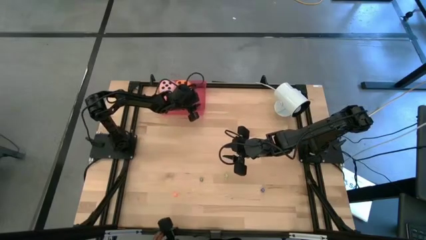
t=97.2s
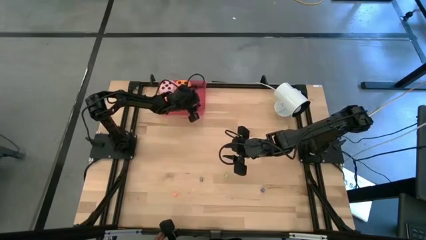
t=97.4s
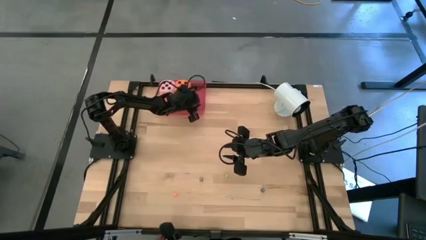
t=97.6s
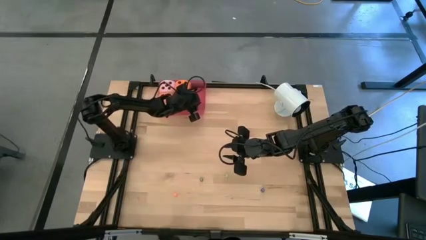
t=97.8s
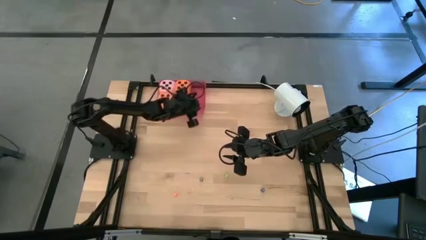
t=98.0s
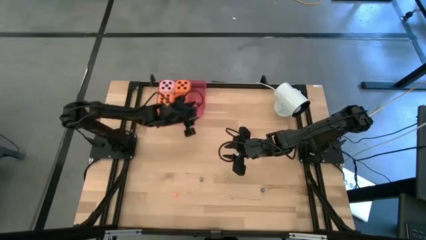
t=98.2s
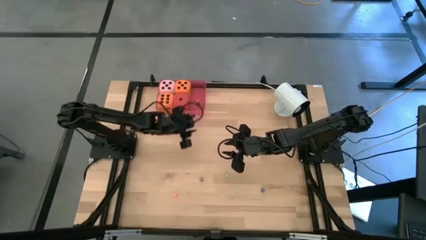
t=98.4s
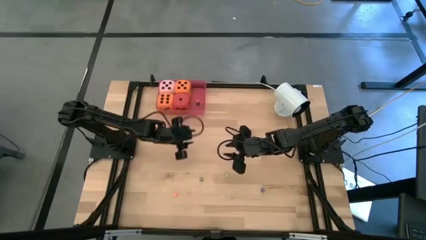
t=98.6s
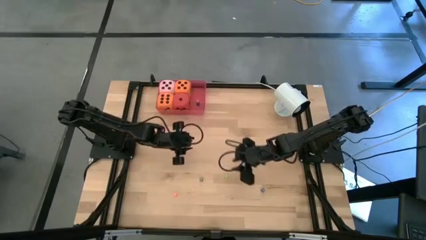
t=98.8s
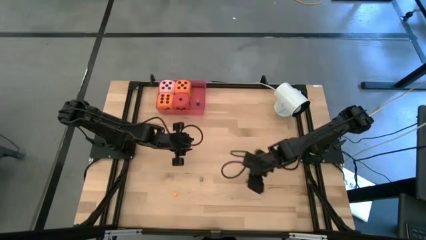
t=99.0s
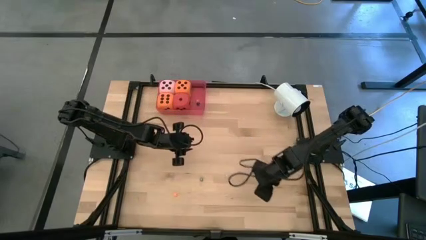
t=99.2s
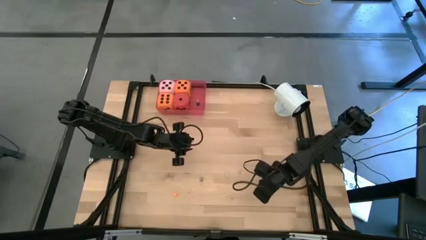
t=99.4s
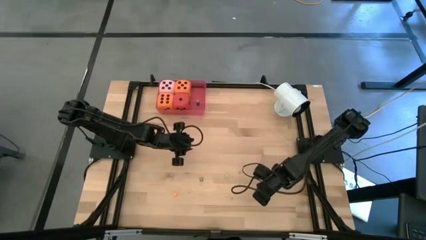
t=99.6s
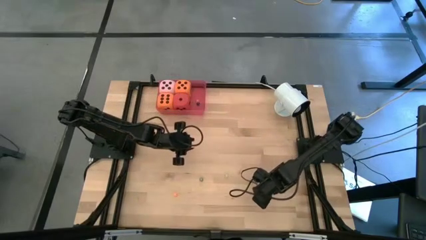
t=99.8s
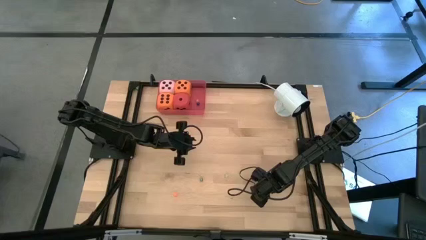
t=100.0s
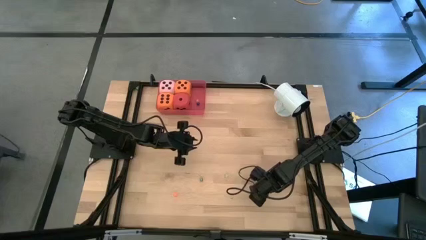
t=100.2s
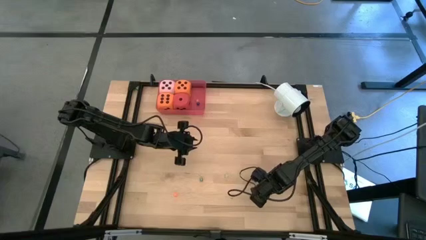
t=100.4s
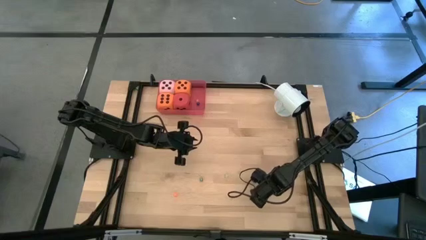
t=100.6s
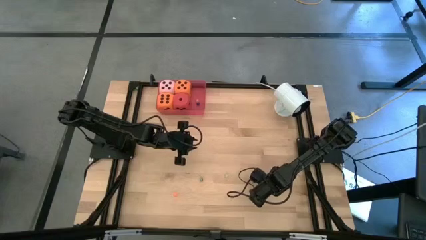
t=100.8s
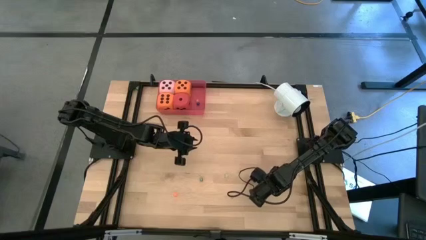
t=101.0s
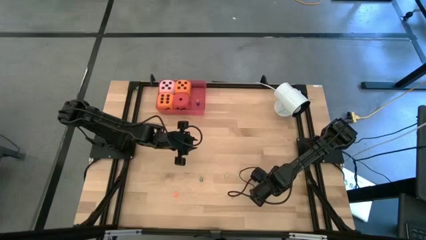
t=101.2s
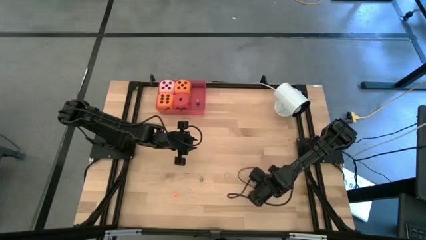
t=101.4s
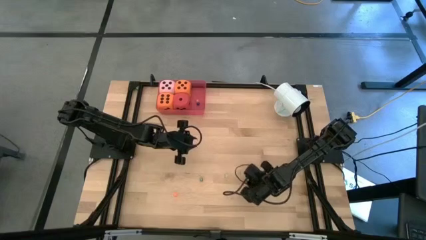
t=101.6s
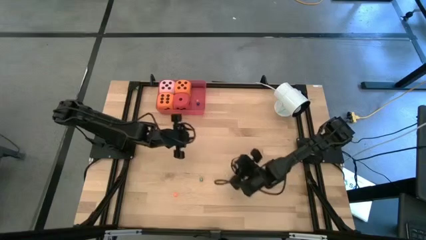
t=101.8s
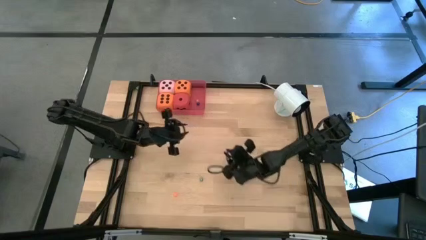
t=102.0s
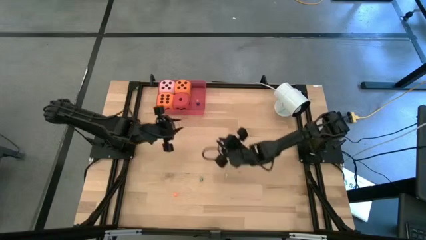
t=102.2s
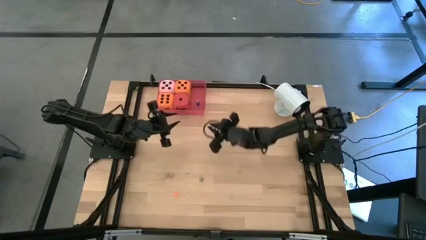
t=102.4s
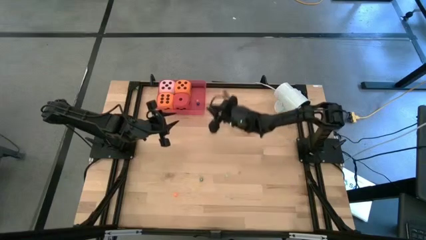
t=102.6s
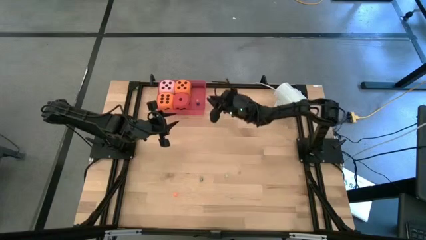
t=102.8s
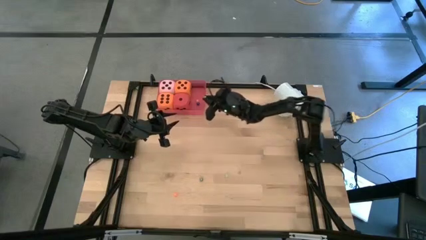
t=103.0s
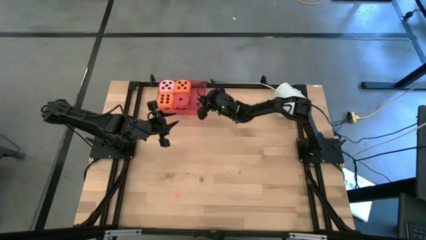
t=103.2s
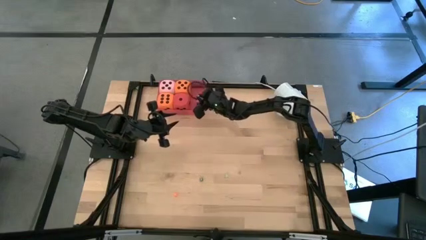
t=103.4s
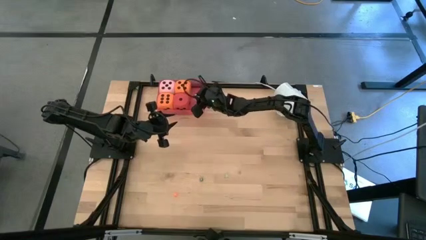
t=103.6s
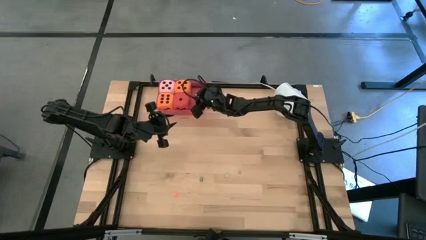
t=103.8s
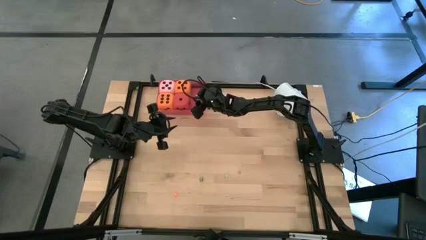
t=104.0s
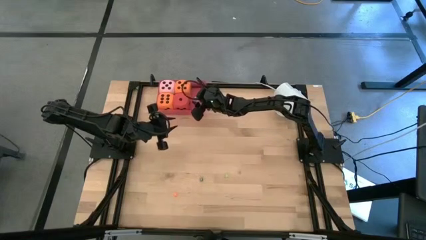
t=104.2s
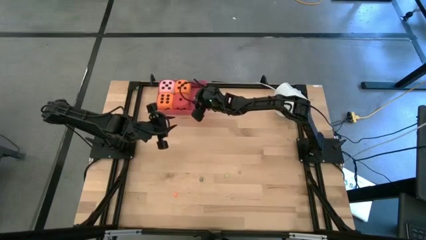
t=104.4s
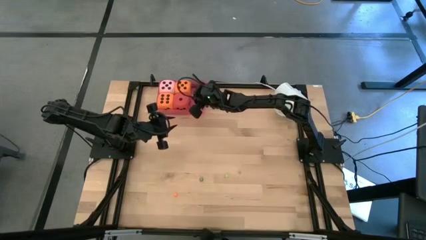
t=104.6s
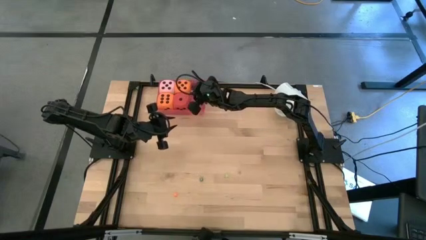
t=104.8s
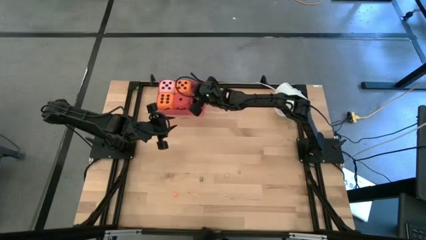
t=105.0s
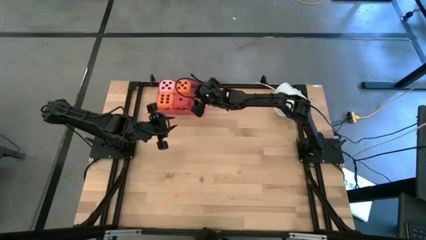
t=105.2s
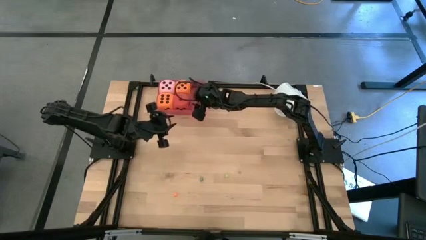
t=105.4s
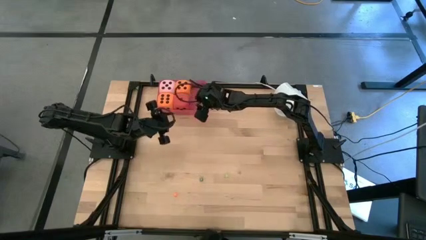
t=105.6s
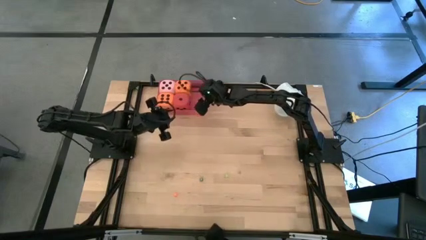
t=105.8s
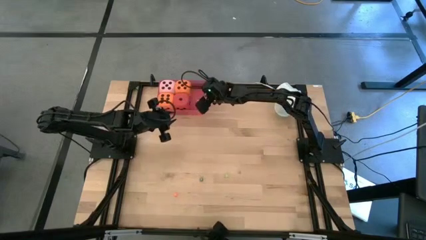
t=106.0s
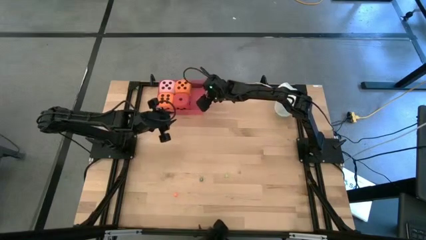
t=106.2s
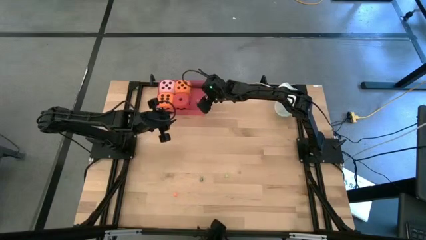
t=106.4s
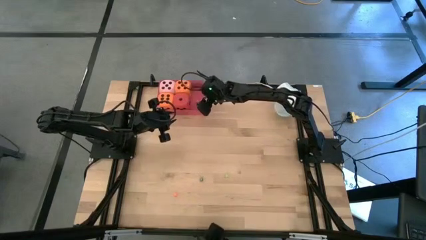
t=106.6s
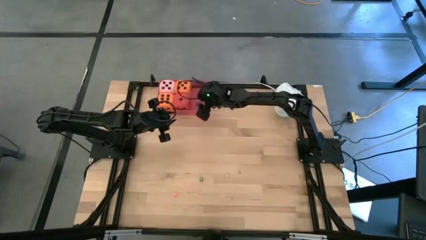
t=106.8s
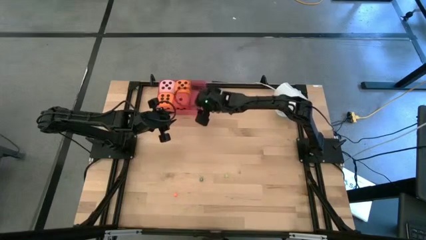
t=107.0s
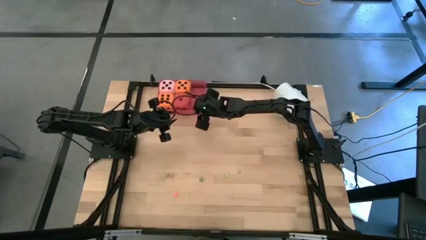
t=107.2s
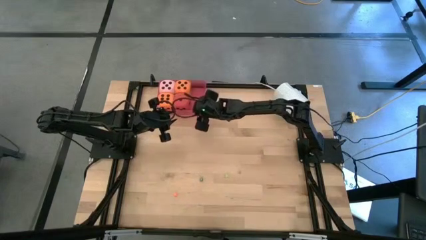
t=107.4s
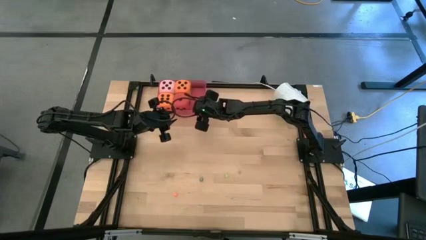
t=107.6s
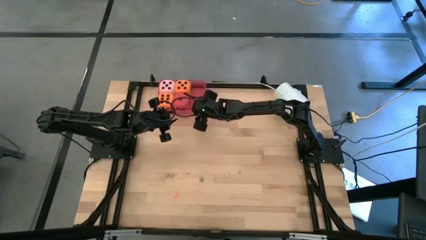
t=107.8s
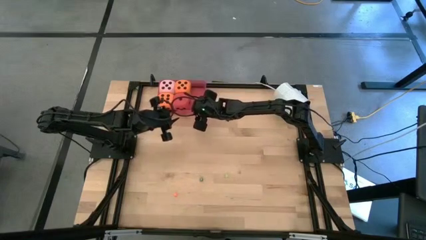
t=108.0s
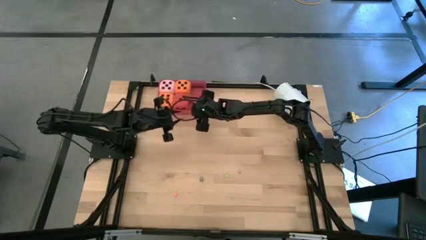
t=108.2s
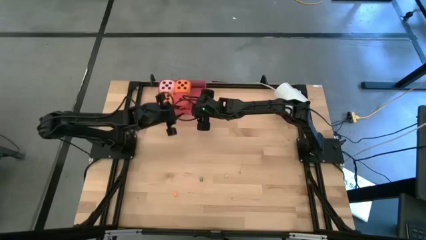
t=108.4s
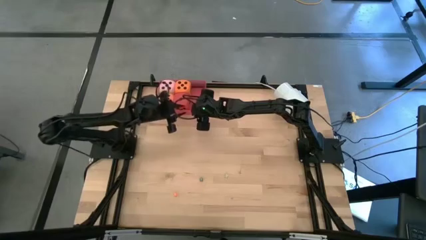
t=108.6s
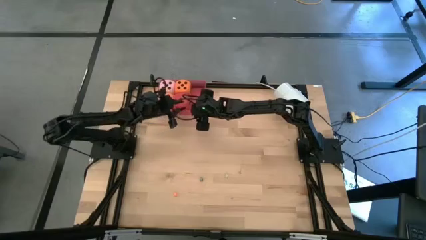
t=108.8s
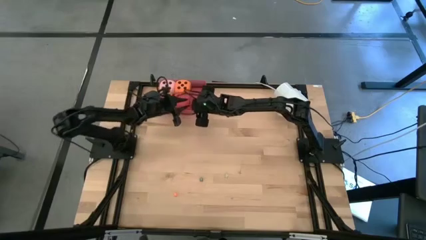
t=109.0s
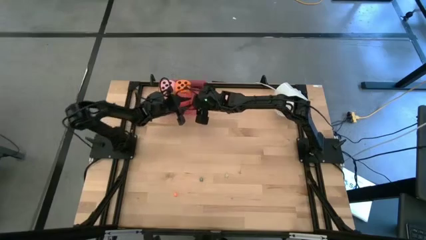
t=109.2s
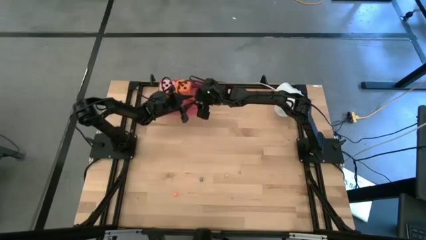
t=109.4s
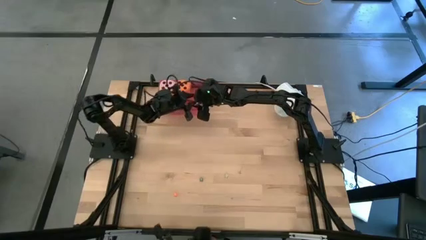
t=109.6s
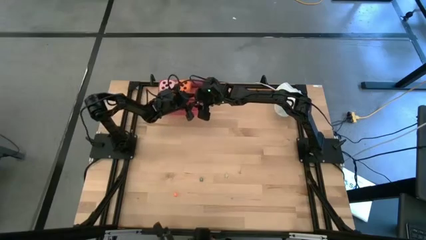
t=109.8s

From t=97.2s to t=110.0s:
Task: Pick & Place Dice
Put the small blue die into the red bin

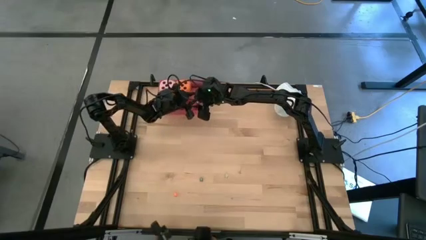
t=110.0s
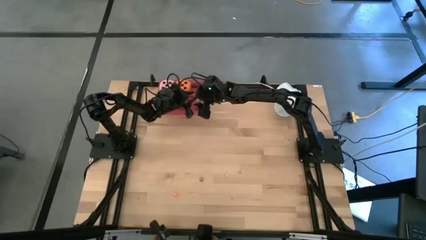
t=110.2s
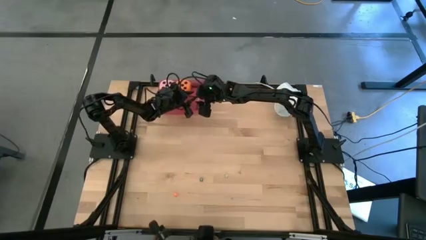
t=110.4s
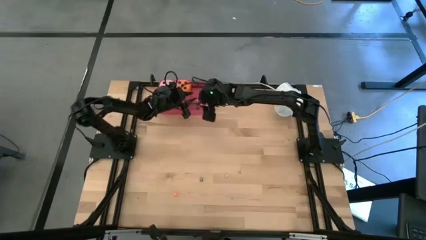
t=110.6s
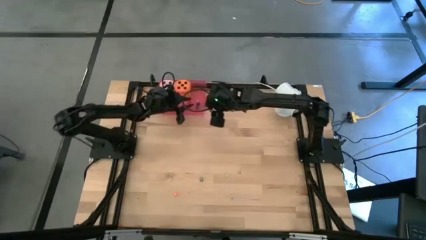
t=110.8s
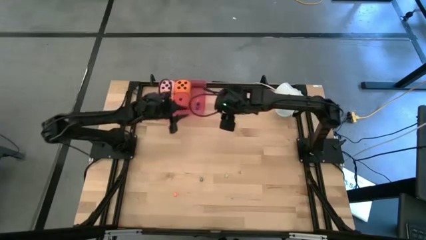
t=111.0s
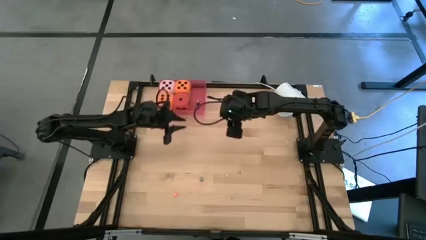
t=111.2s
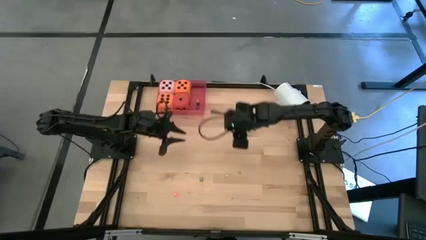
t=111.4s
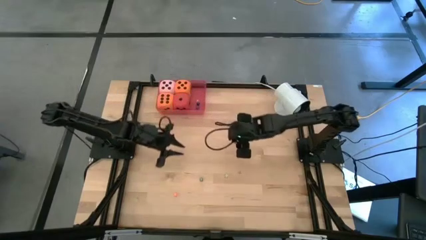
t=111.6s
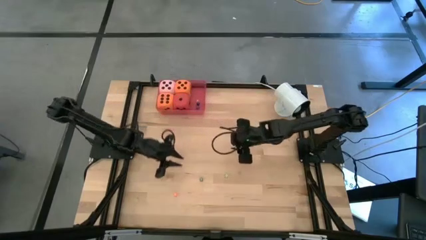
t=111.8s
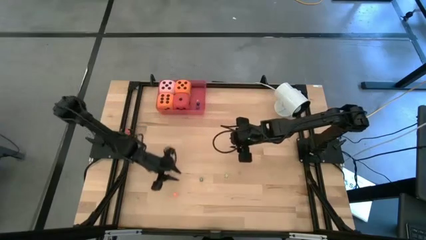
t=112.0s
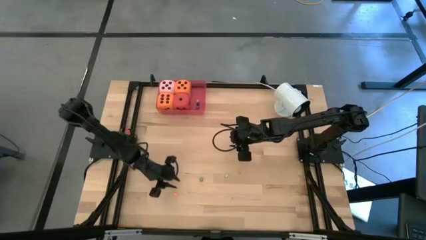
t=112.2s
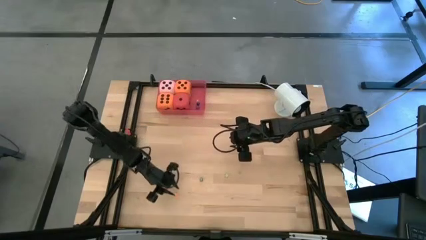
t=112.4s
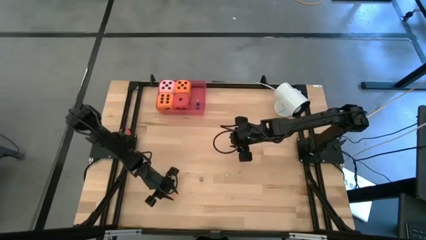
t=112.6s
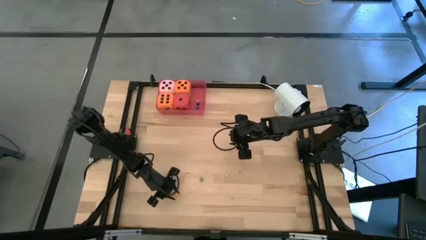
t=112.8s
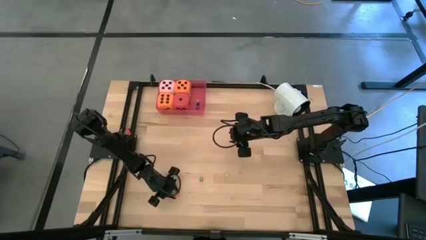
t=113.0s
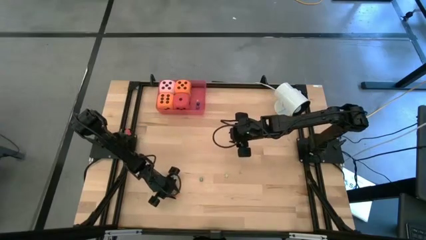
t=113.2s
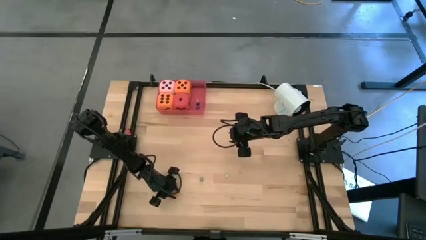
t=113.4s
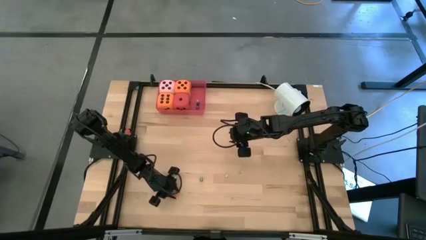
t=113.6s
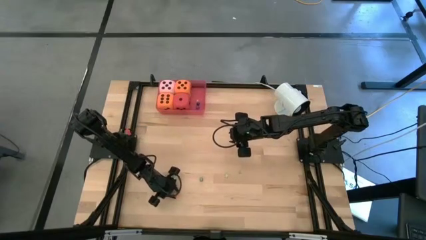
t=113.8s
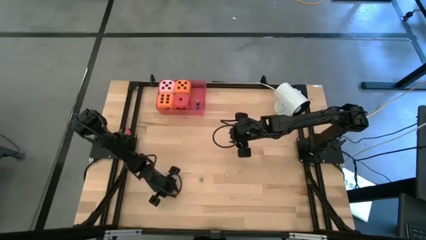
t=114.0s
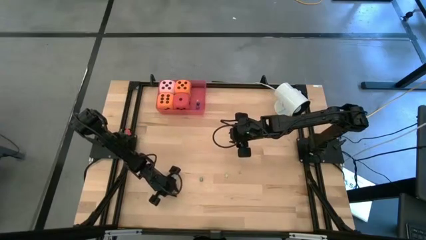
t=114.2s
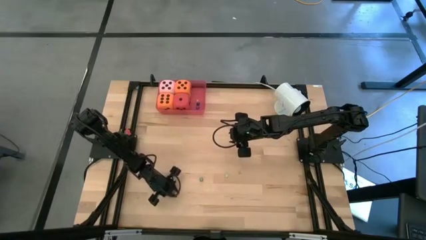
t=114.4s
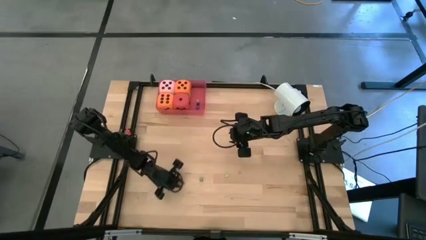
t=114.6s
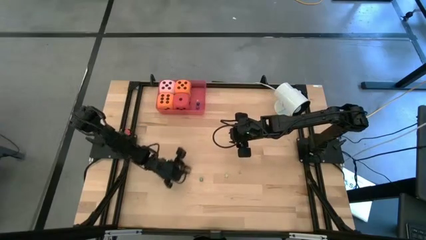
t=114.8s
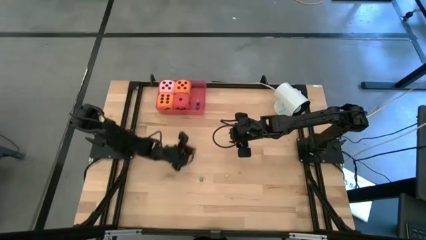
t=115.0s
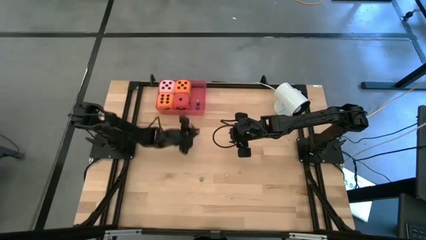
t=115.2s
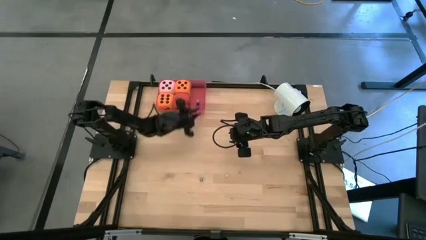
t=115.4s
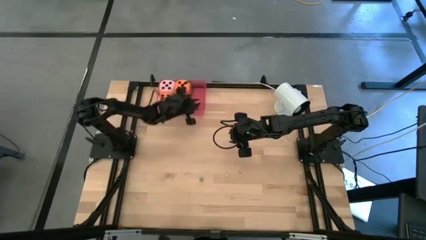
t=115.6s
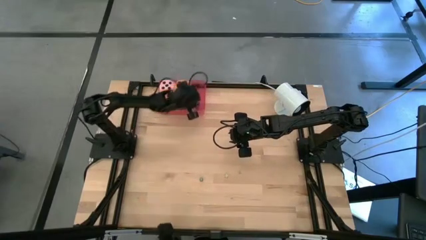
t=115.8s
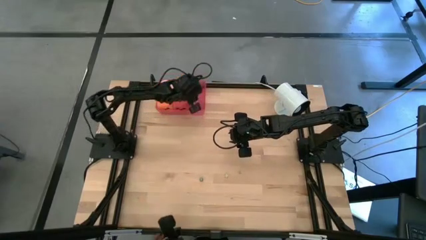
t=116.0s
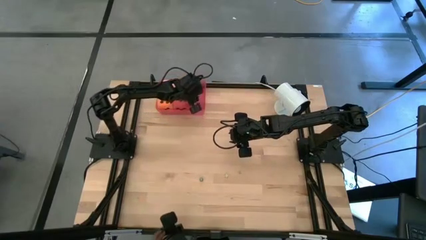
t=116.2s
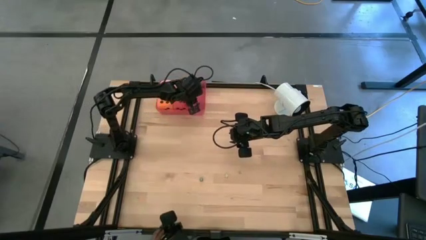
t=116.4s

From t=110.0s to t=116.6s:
Put the small orange die into the red bin
